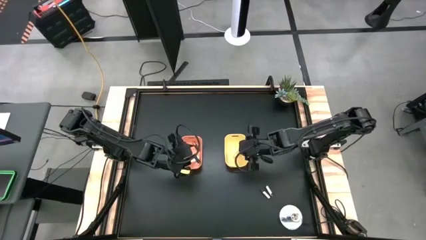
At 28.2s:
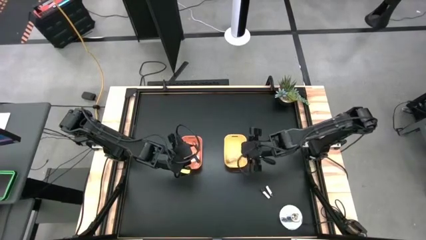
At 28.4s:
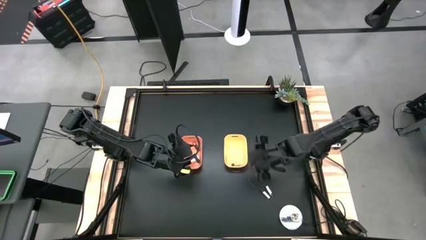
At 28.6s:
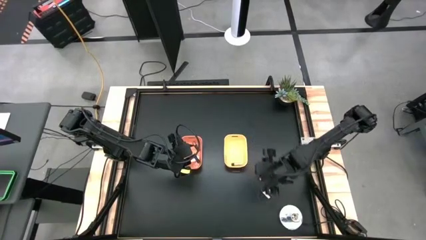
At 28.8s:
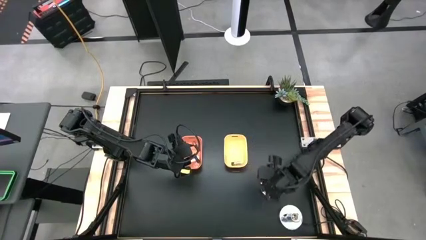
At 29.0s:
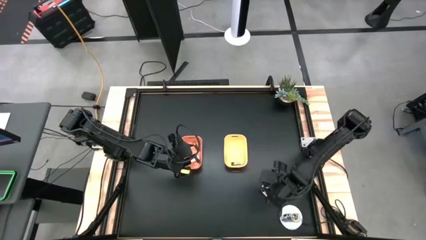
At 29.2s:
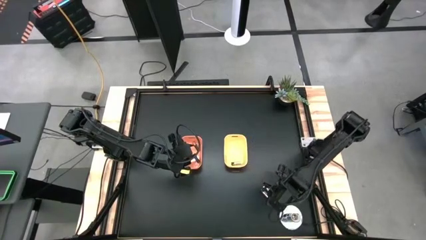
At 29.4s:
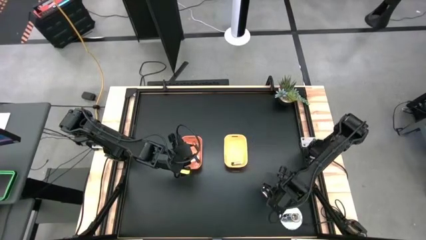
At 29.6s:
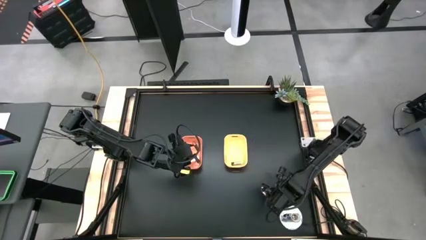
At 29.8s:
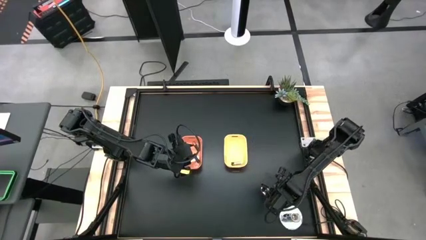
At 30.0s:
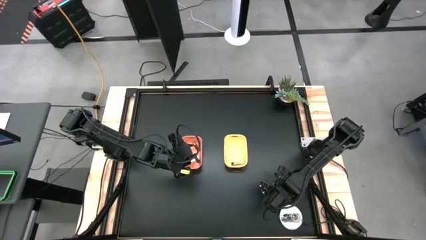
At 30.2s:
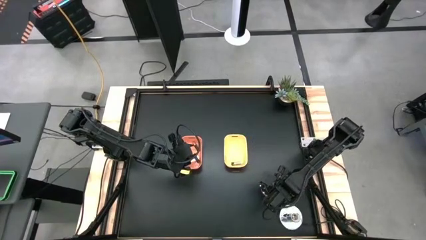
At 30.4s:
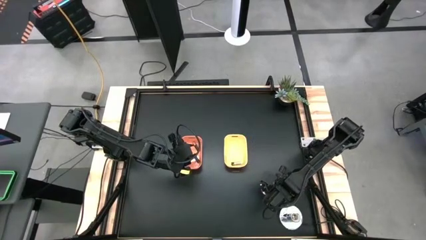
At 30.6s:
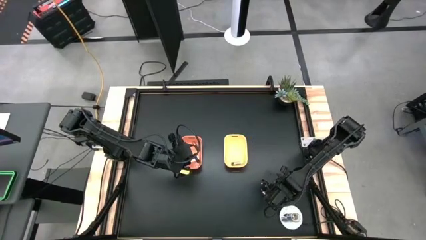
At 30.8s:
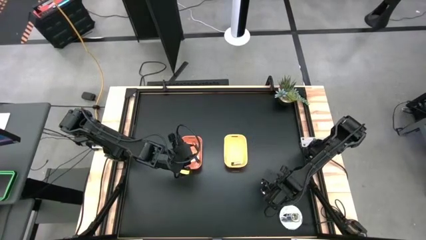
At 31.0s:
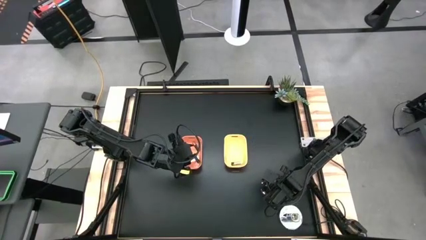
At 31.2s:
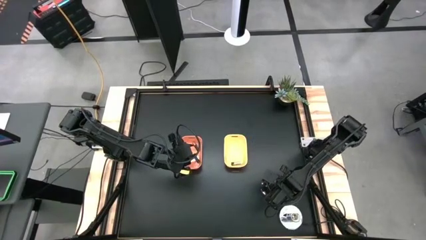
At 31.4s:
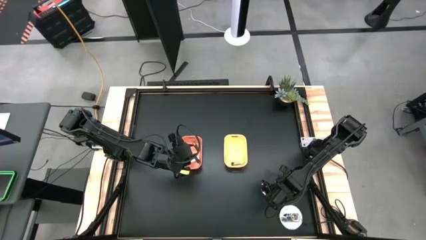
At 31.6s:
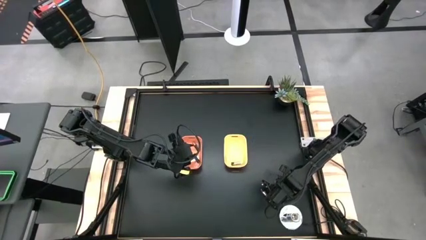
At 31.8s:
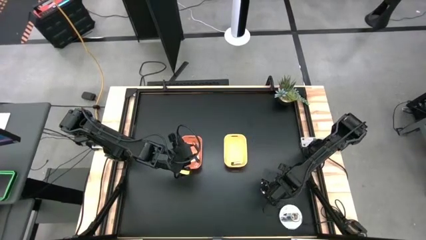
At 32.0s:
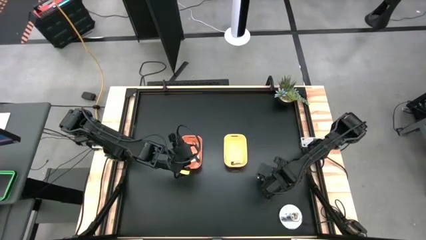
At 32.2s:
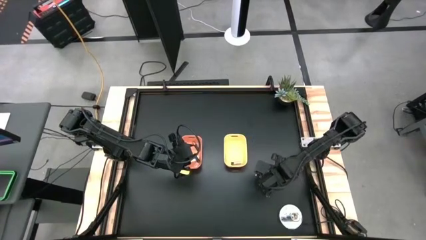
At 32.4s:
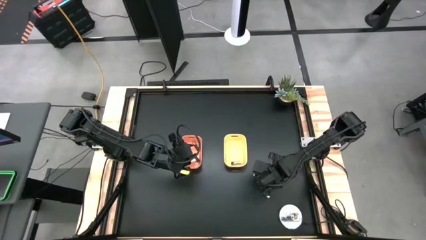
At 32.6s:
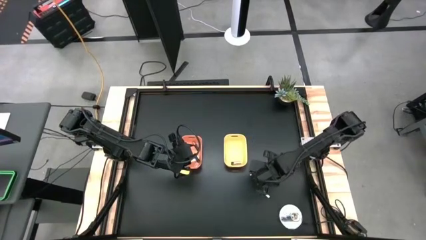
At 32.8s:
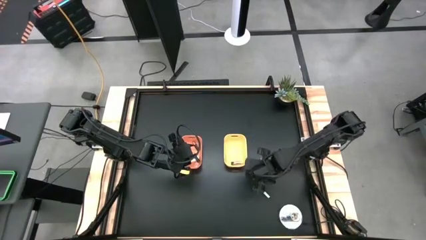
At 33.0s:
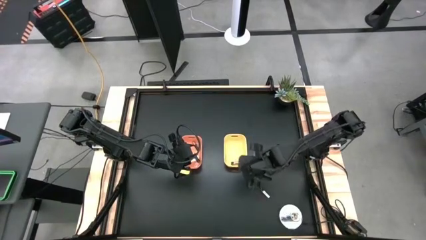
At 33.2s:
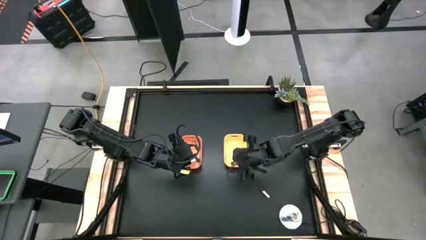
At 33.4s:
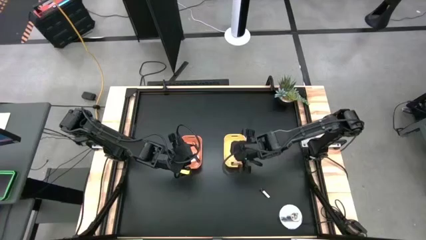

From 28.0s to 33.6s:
Task: Sort batteries
Put the right silver battery into the yellow bin

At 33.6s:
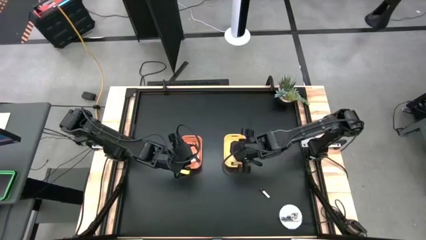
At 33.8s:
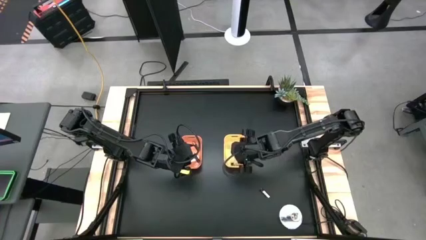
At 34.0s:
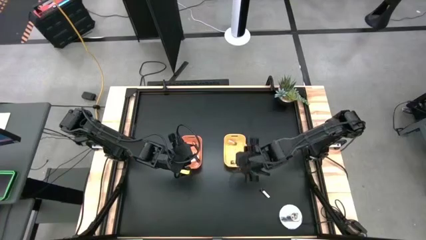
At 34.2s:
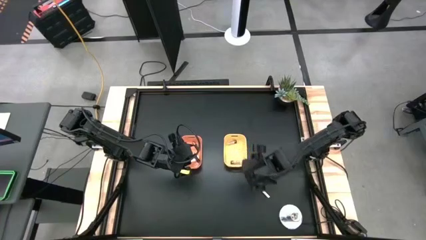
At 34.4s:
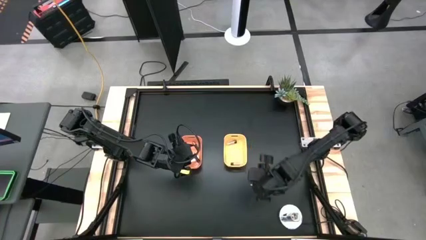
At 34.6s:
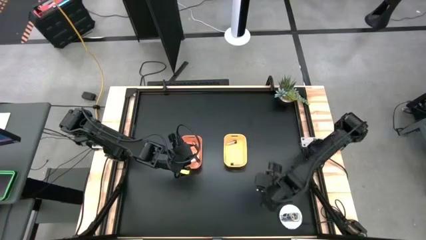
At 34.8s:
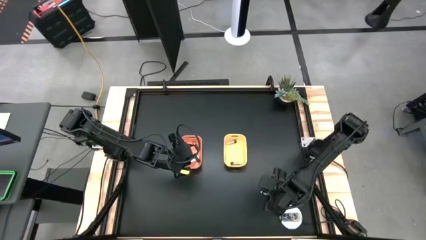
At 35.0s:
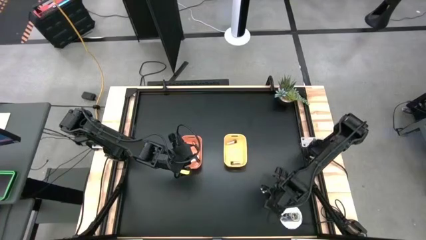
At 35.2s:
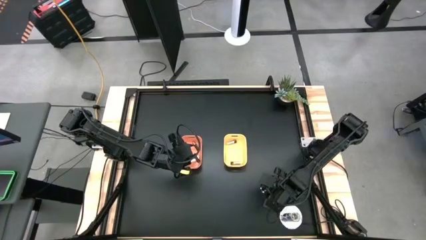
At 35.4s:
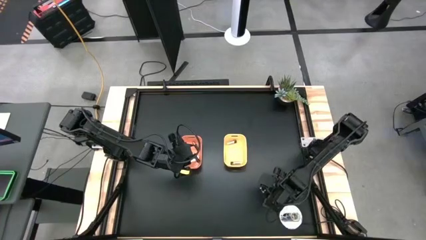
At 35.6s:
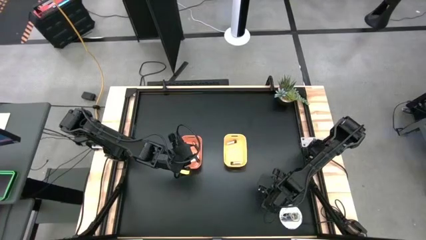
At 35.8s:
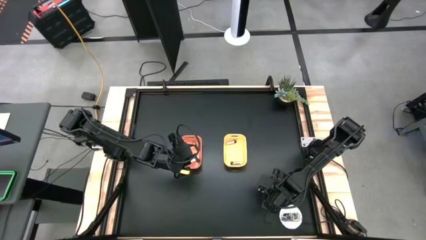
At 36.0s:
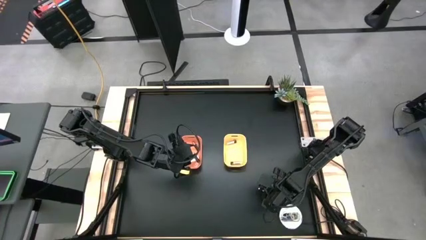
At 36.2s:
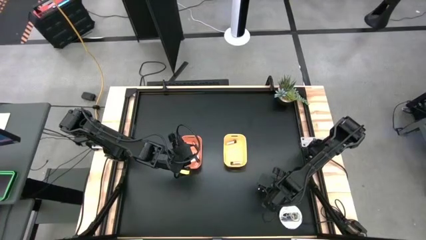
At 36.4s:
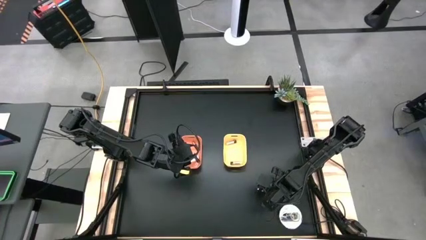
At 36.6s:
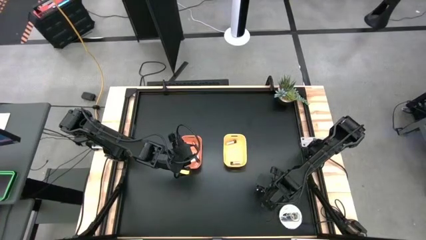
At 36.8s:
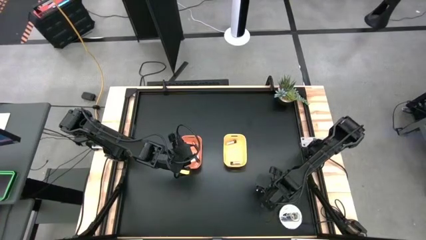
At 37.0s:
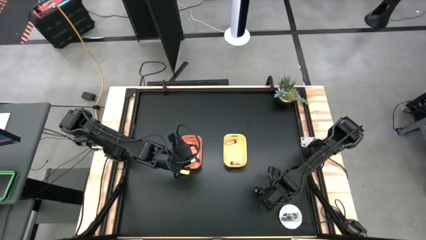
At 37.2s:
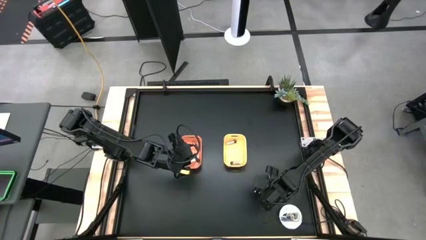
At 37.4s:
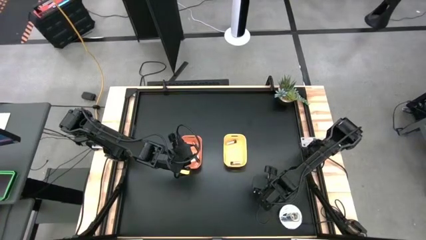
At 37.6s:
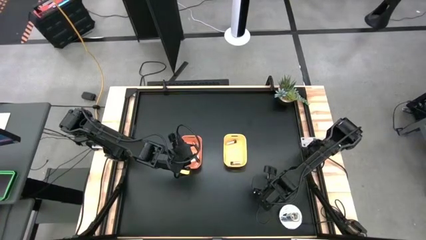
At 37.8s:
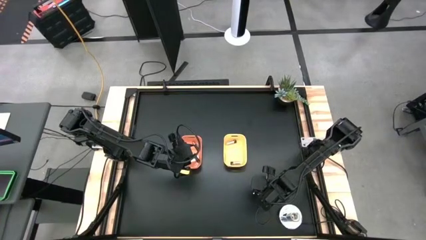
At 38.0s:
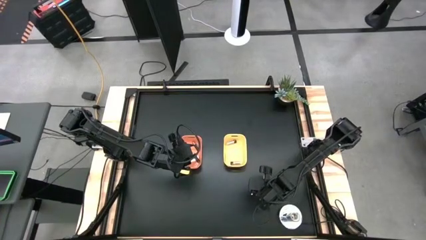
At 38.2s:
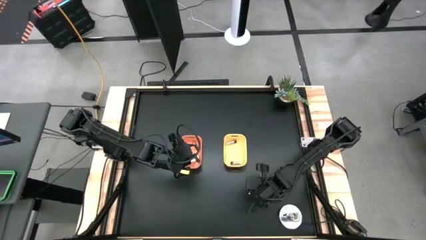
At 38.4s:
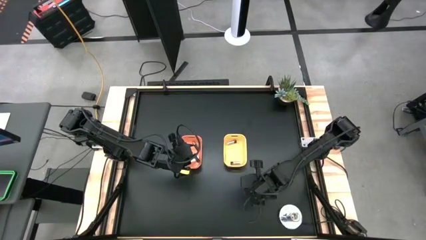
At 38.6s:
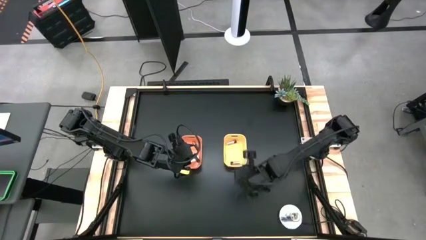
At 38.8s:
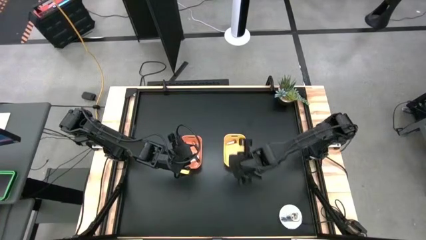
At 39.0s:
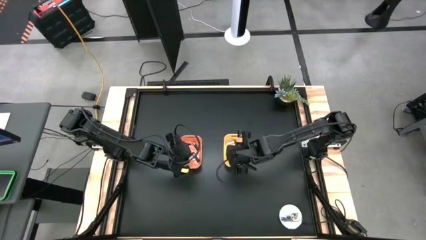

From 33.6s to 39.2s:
Put the silver battery into the yellow bin

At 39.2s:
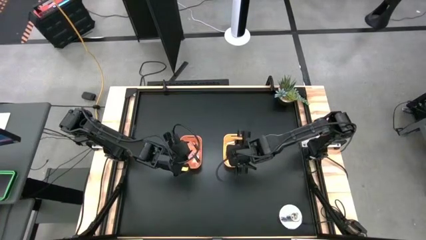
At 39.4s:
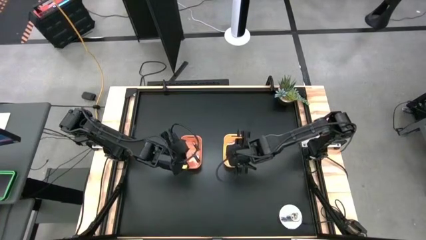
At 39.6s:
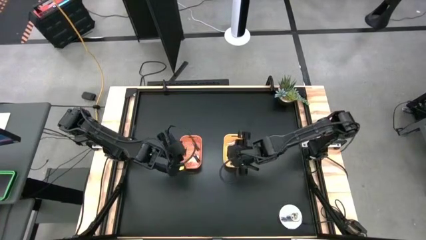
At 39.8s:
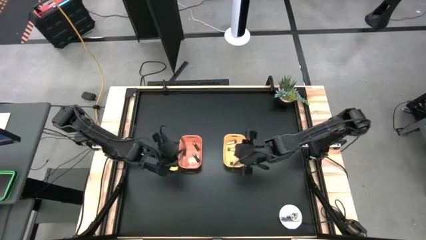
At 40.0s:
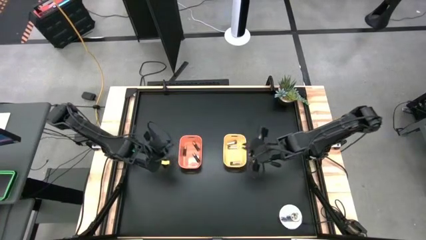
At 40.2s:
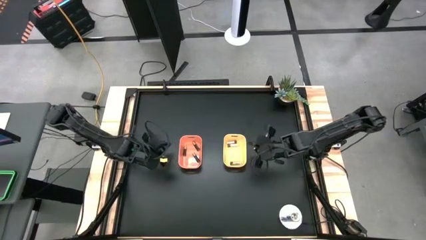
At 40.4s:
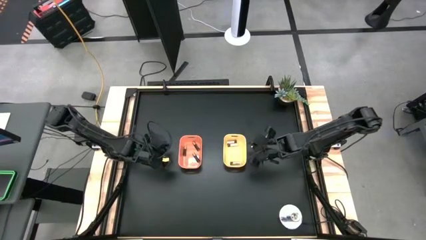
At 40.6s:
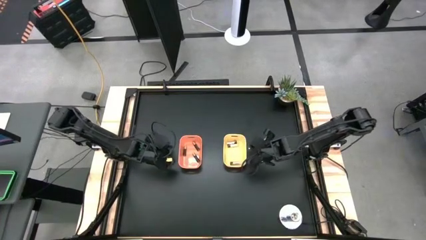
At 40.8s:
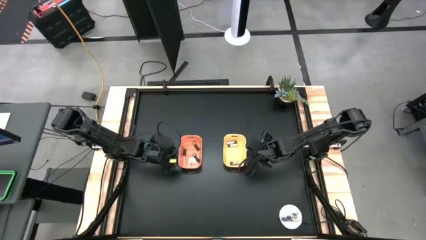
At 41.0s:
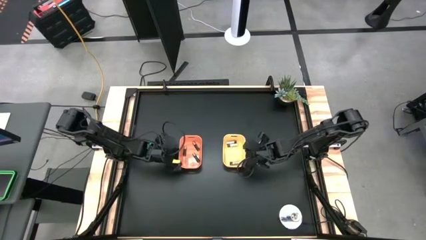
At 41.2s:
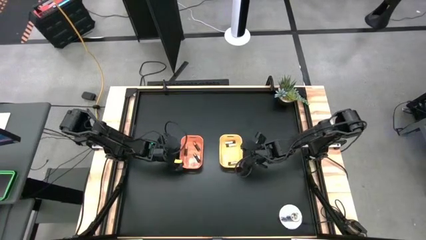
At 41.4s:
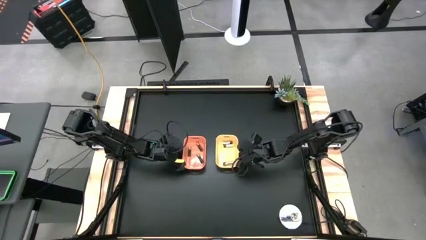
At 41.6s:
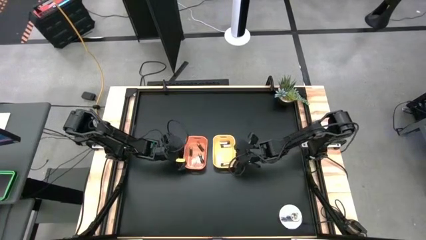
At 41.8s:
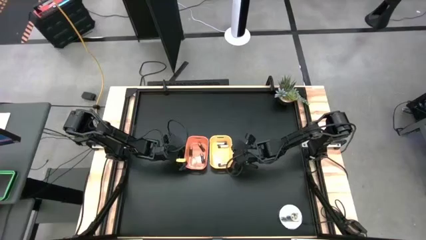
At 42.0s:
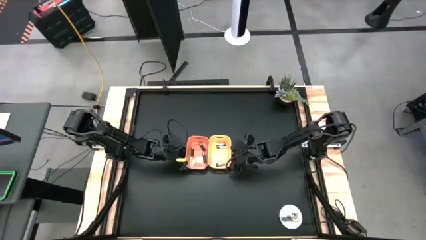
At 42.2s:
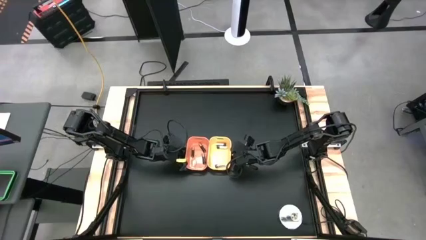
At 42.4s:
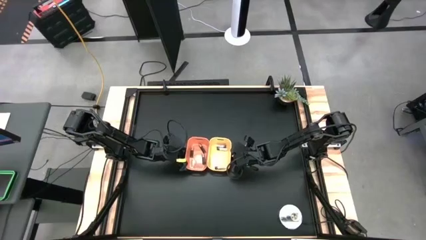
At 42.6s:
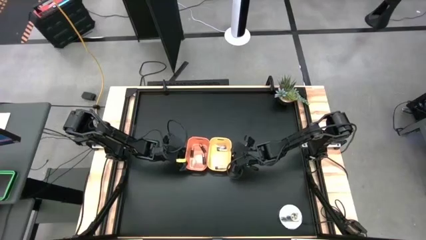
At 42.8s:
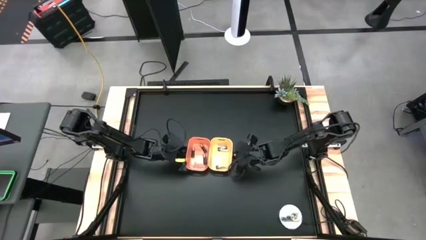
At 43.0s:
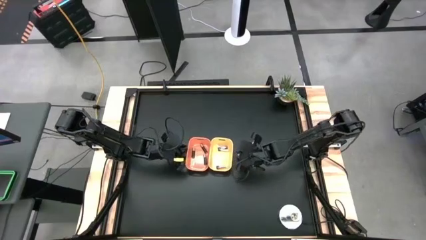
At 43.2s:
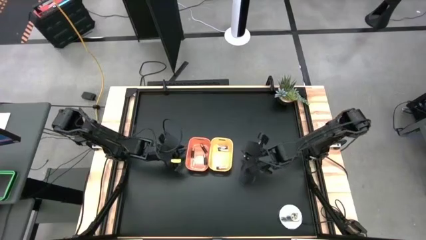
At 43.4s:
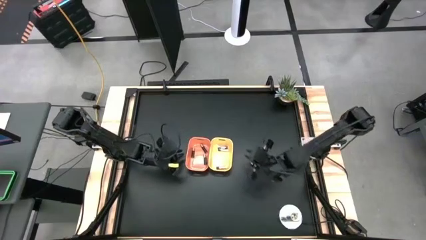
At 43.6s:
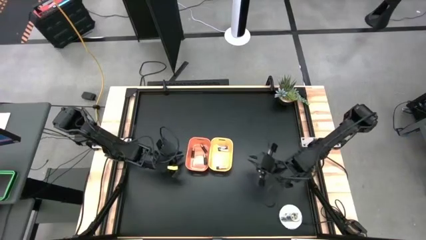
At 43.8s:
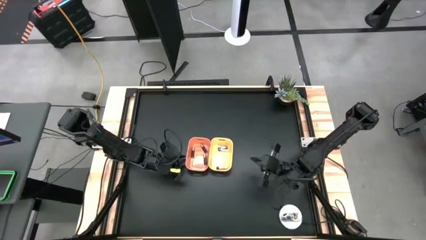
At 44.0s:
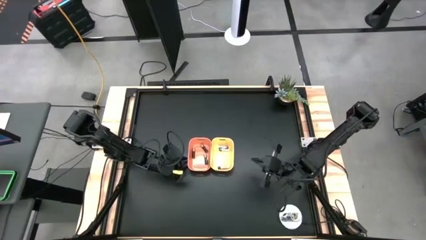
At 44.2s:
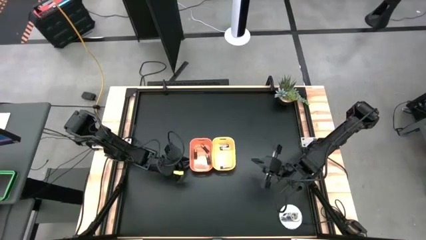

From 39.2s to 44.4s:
Adjust the bins to the center of the table
